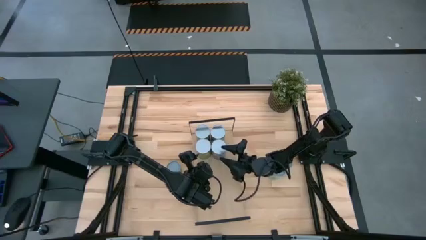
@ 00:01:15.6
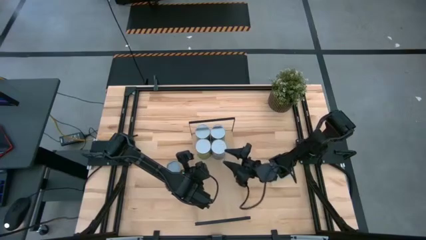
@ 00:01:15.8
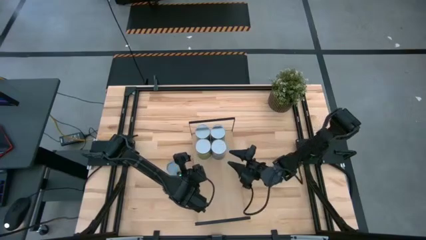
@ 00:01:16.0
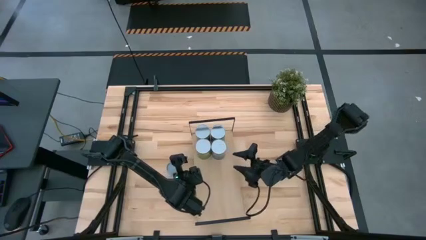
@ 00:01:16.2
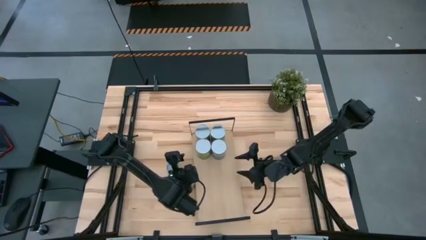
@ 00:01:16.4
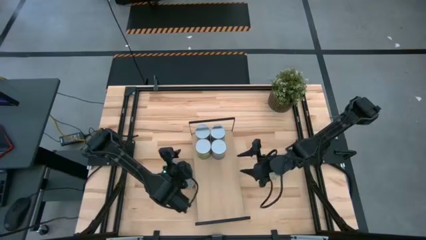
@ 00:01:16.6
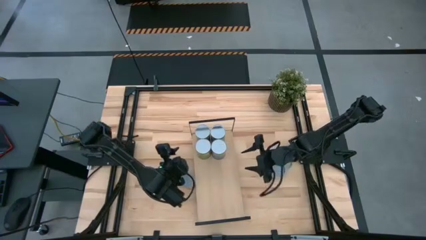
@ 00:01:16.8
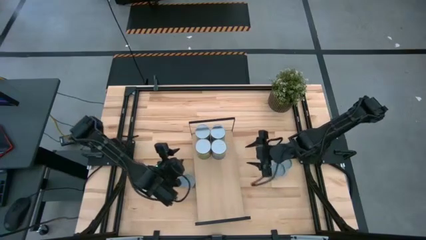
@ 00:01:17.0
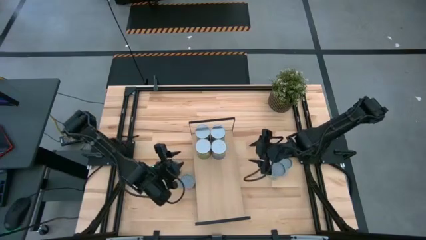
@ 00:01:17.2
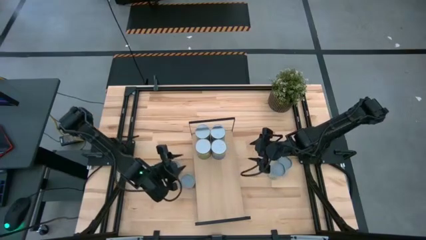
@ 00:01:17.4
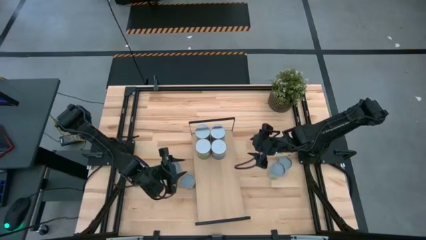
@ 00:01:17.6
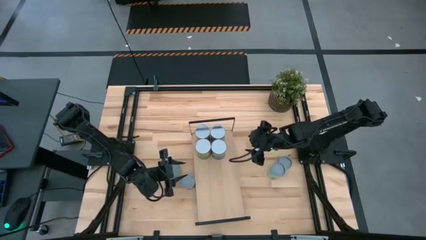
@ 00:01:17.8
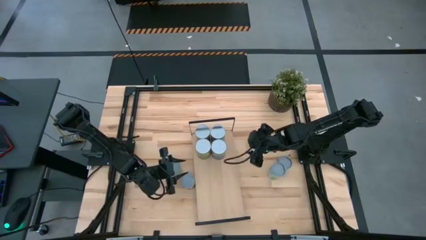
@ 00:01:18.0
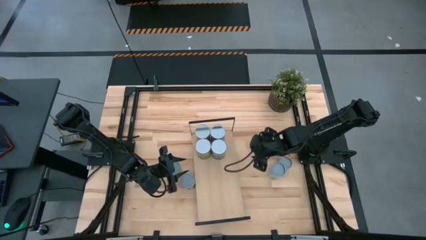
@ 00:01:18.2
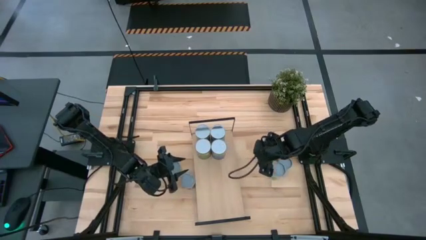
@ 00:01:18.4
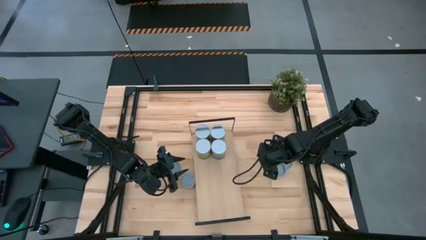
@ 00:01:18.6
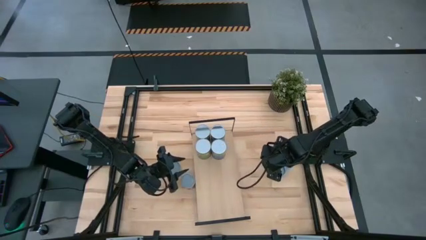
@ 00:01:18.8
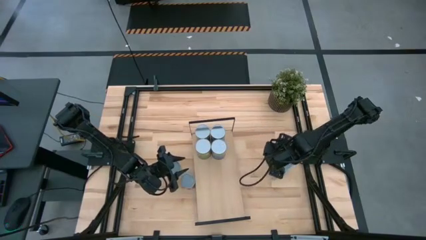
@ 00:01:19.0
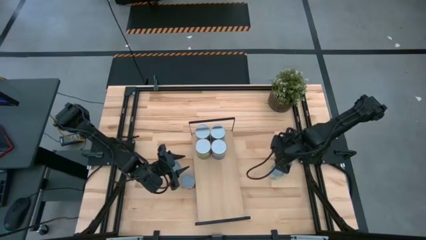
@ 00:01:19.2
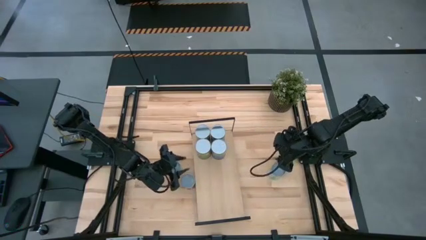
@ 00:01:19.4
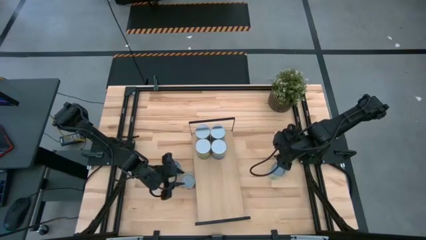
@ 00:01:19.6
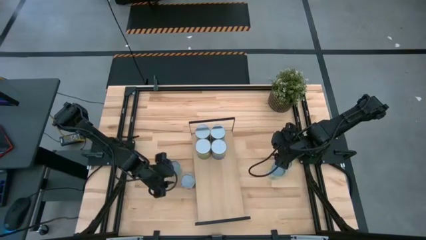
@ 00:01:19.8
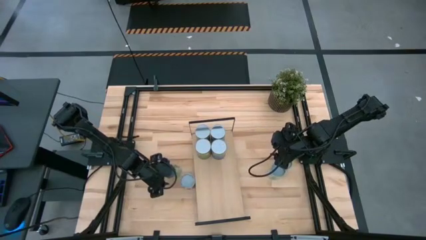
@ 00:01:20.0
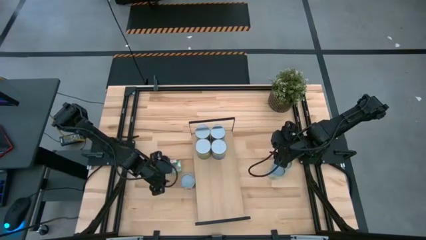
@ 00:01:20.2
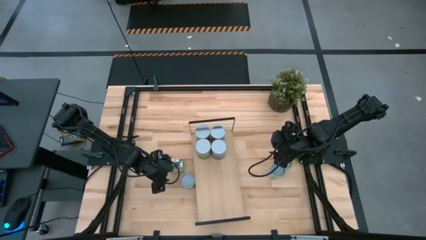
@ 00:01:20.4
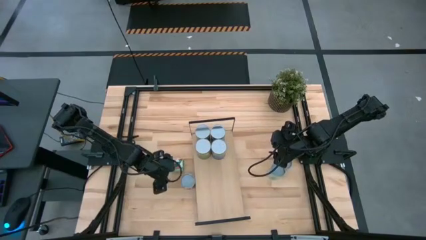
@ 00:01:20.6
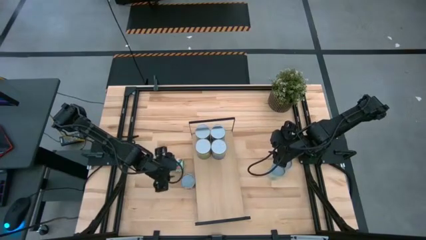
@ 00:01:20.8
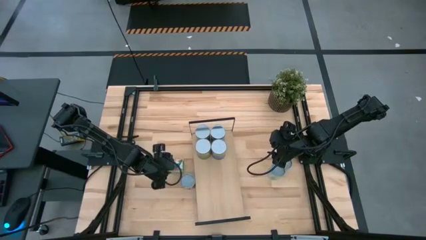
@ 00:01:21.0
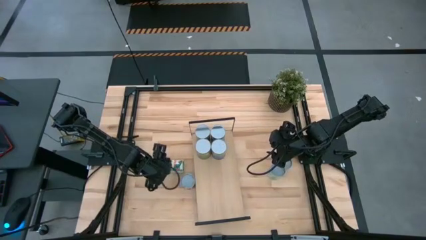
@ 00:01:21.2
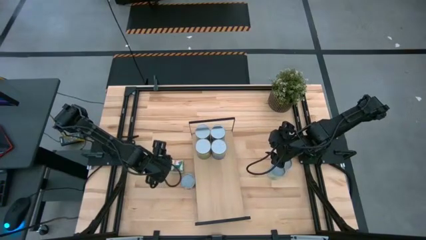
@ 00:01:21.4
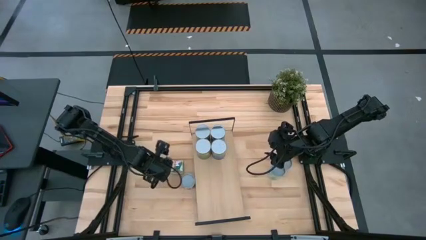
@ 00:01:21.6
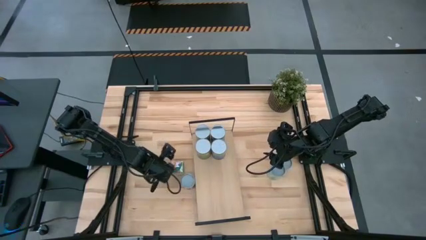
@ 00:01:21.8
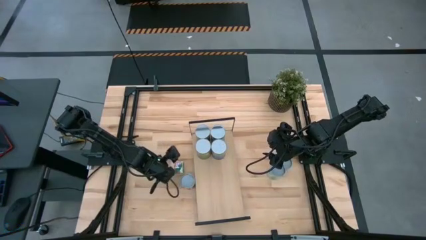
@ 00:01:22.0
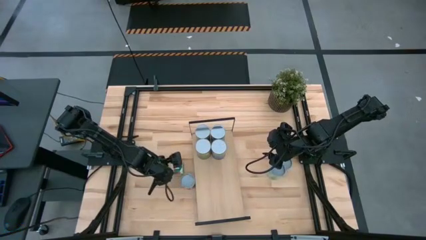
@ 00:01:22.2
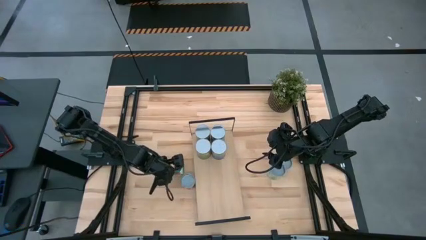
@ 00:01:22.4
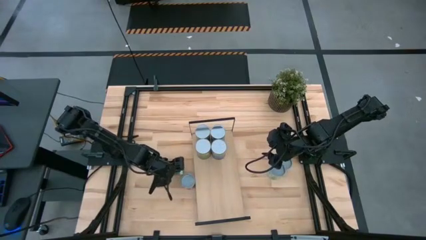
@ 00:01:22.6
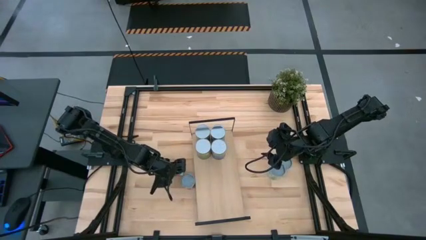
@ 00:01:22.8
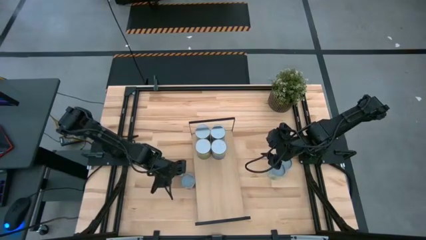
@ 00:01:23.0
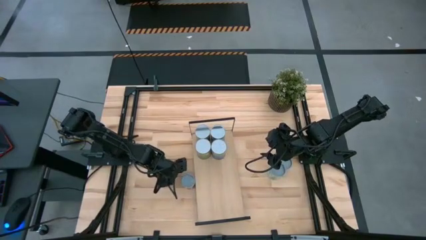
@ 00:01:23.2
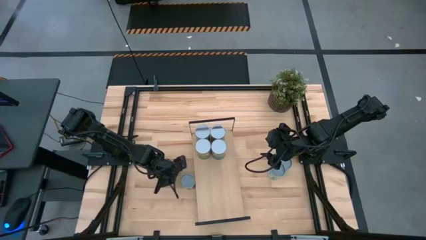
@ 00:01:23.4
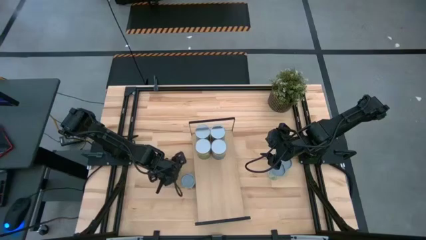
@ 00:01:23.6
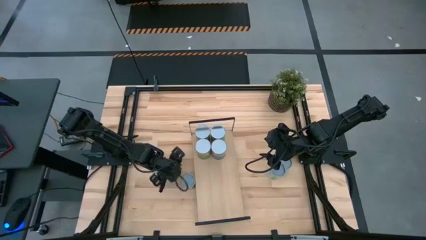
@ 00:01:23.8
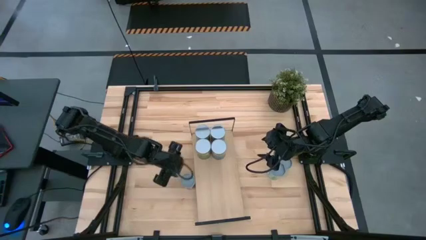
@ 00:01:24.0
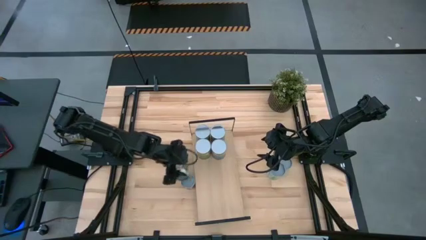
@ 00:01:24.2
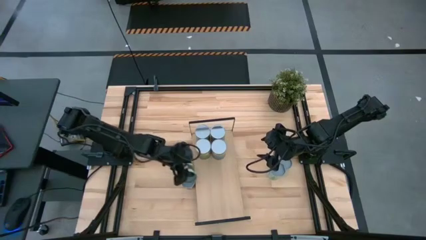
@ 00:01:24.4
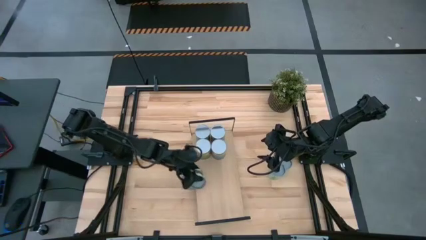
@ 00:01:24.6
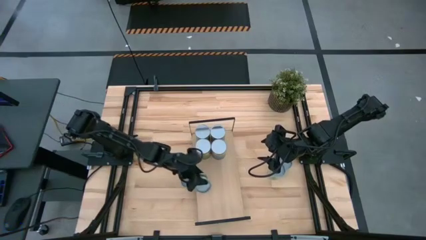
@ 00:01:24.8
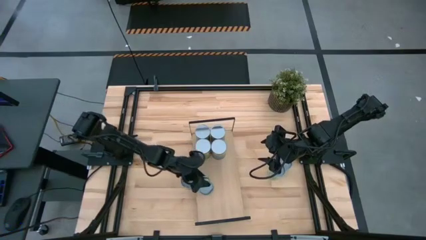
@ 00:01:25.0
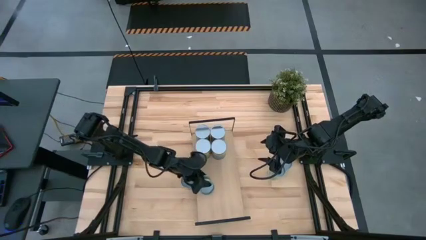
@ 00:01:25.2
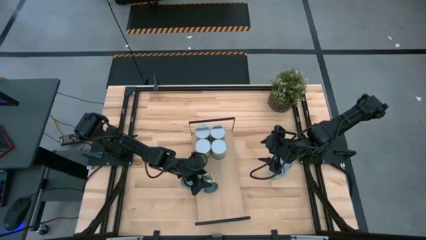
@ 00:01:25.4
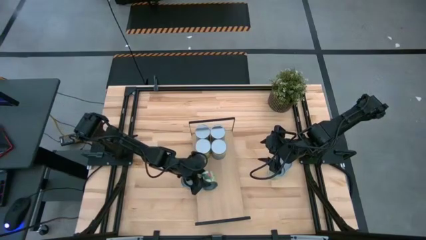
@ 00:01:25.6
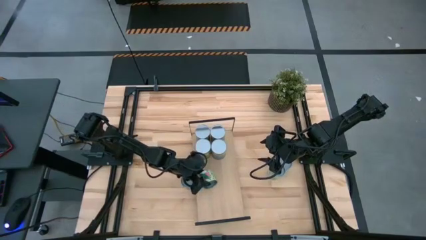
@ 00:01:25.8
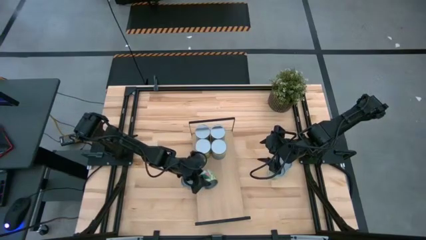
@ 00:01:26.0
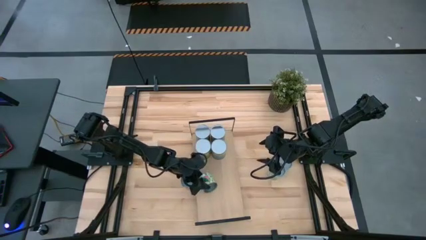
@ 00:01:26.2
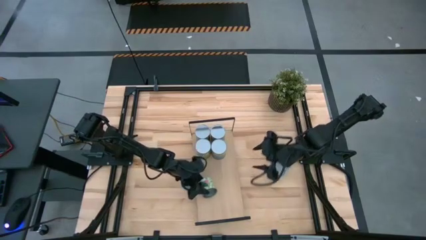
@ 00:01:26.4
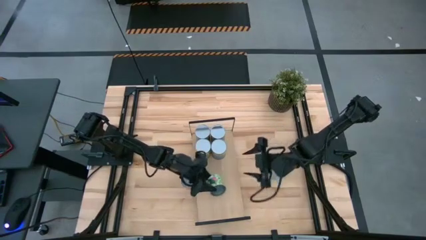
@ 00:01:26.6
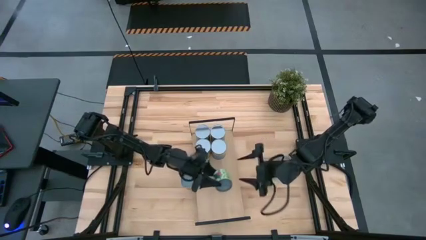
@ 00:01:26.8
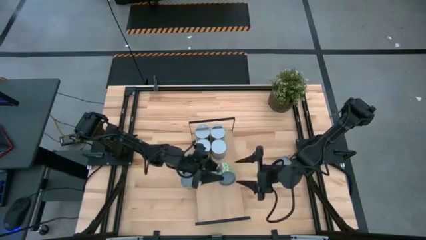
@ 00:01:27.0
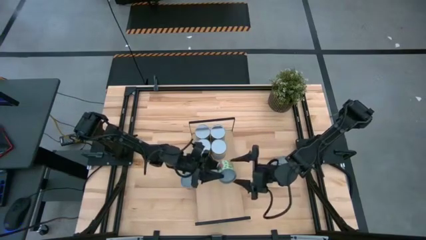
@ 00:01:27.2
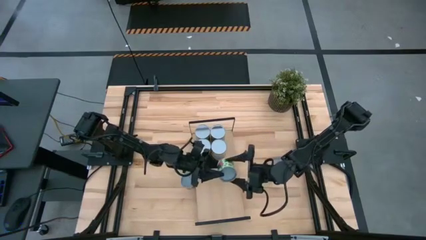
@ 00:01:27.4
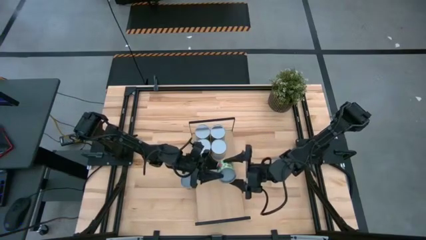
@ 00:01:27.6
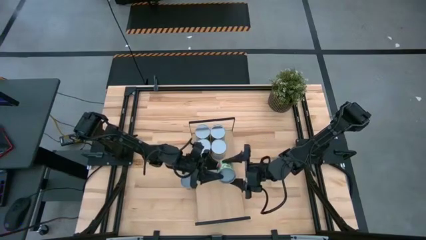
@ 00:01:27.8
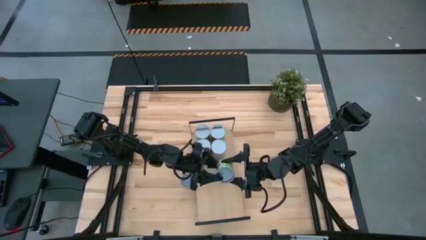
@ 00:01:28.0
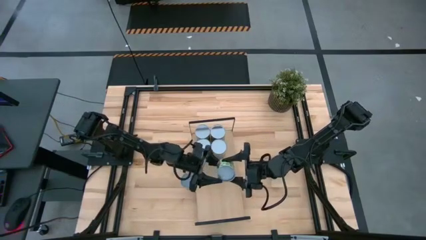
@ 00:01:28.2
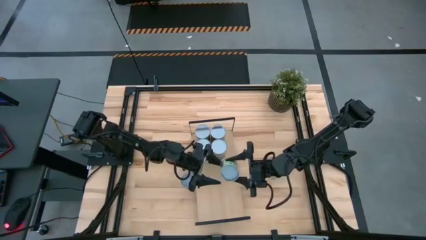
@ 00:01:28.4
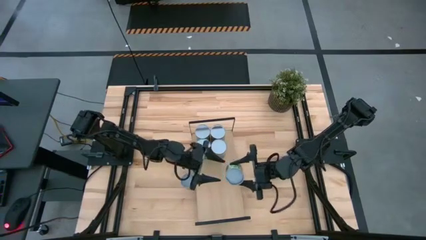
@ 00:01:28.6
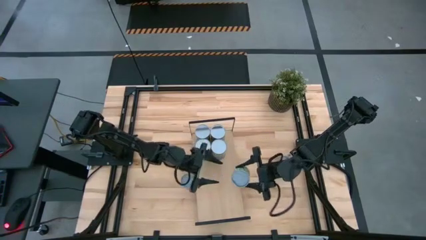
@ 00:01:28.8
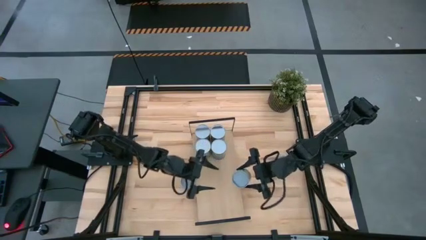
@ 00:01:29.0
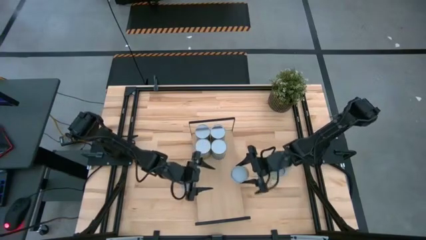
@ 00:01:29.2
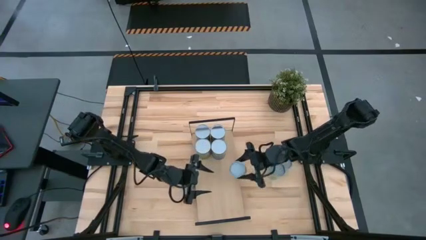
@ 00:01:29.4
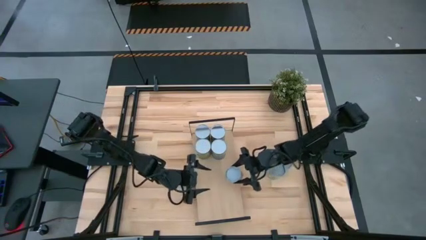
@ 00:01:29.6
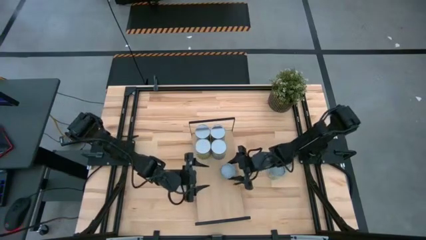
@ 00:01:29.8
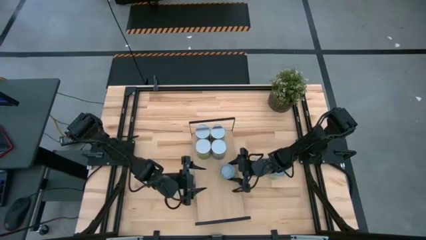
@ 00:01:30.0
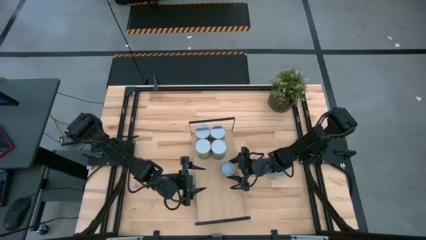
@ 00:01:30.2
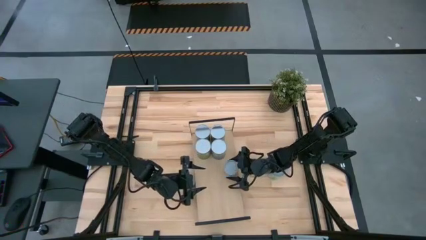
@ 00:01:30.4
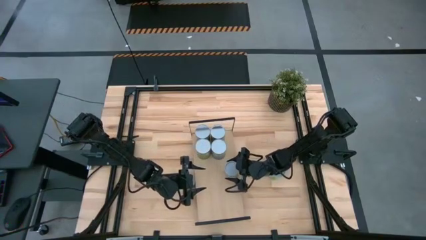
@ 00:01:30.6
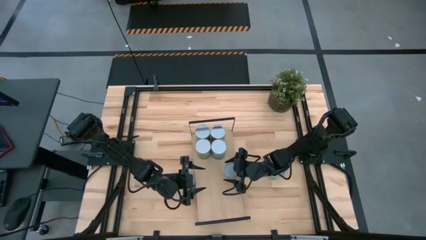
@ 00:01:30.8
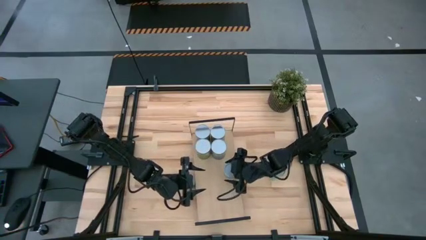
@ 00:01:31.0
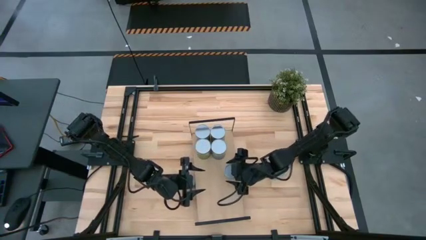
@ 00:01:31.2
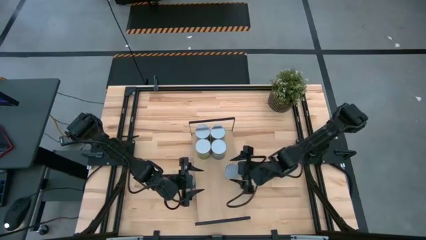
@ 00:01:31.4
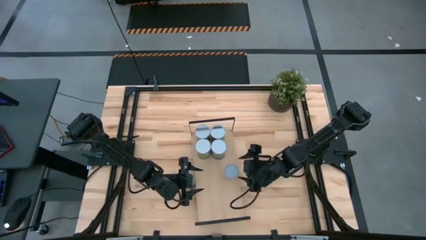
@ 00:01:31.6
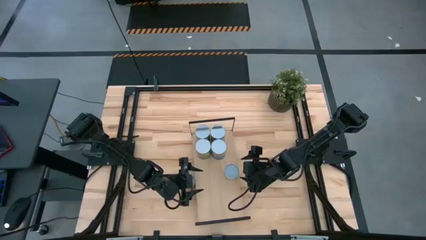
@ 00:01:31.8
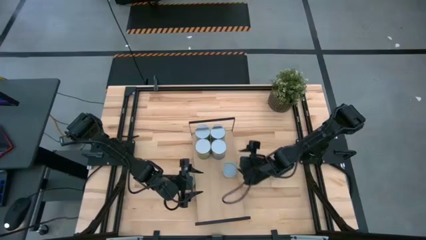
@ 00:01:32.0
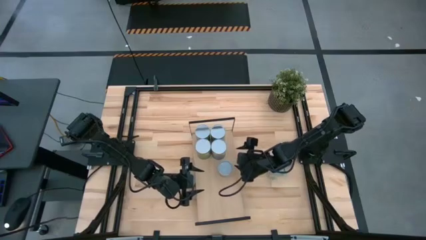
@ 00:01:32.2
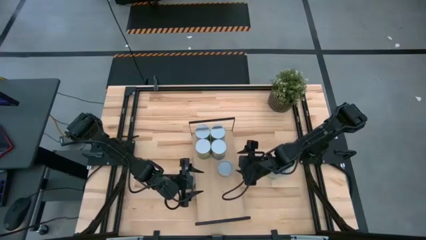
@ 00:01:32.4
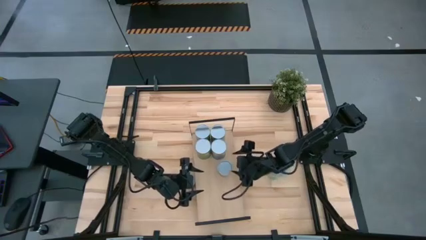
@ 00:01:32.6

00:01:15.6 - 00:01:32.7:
Task: Pick and place cans onto a shelf
Put the small canned peas on the shelf
